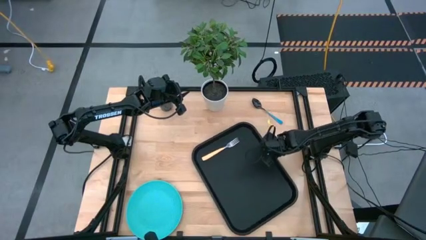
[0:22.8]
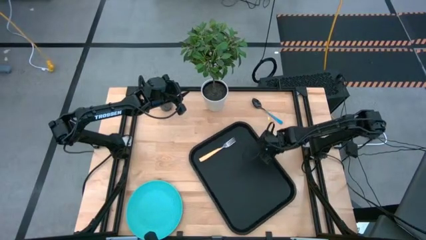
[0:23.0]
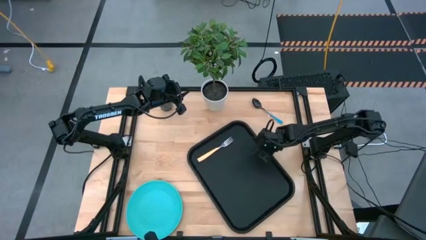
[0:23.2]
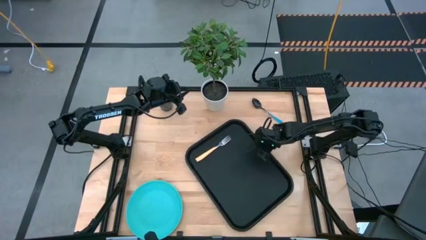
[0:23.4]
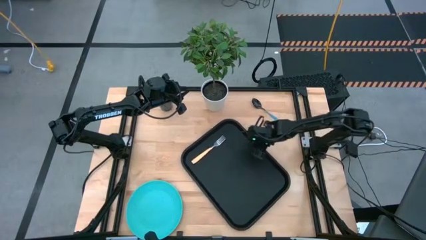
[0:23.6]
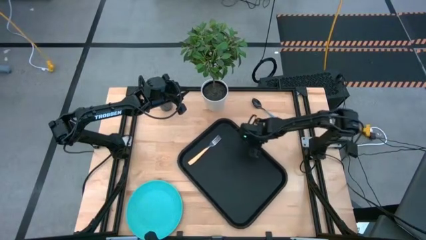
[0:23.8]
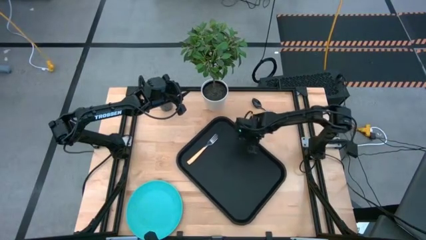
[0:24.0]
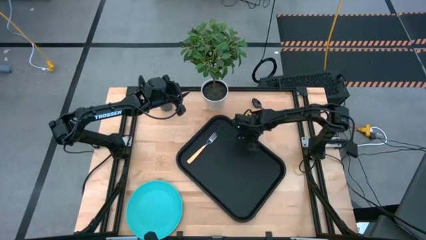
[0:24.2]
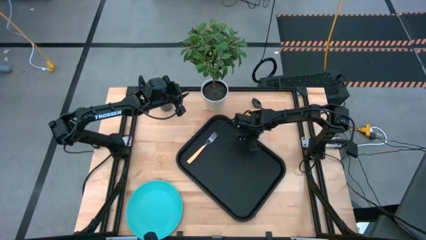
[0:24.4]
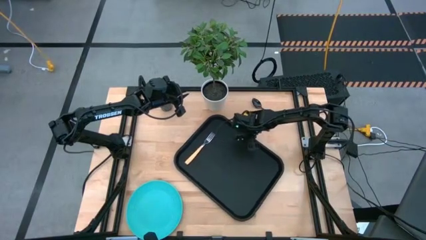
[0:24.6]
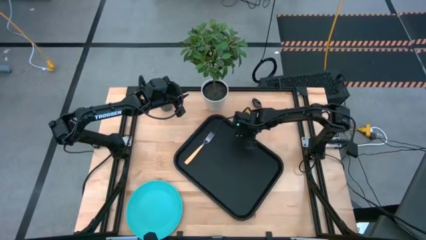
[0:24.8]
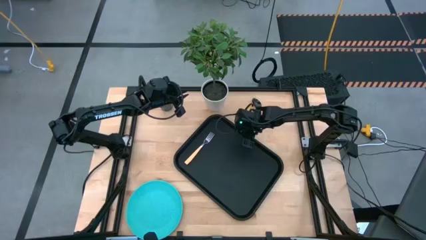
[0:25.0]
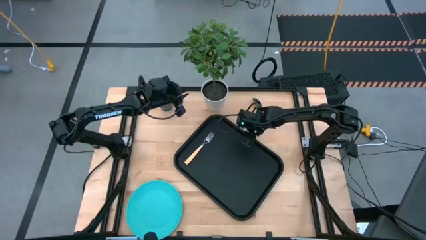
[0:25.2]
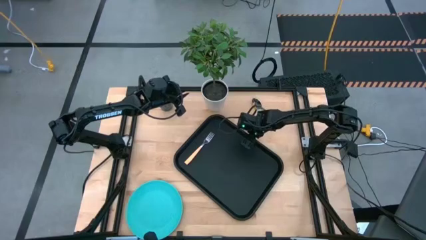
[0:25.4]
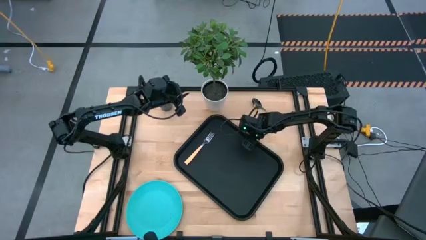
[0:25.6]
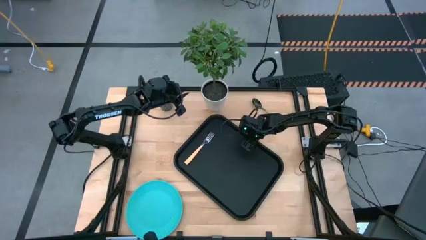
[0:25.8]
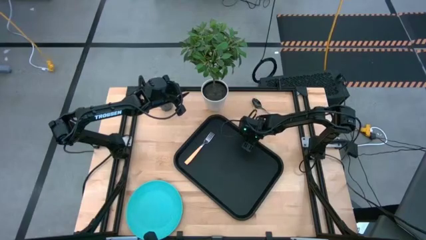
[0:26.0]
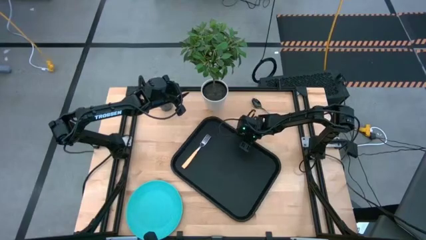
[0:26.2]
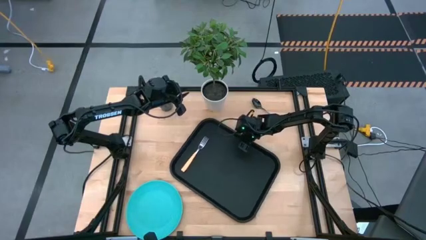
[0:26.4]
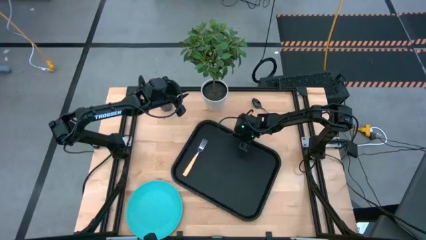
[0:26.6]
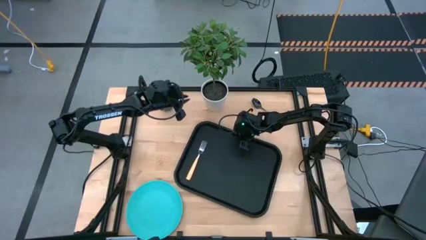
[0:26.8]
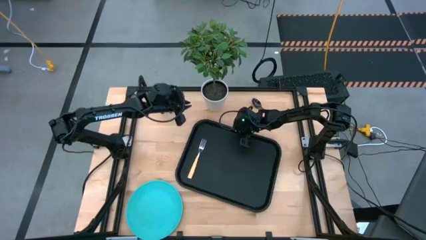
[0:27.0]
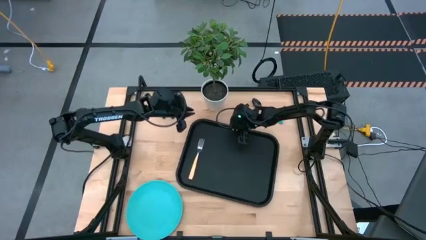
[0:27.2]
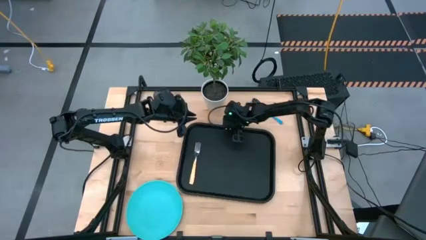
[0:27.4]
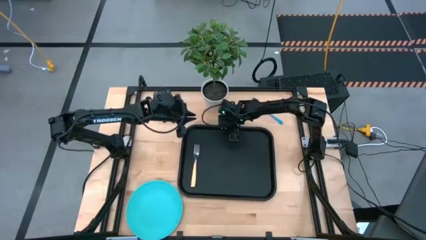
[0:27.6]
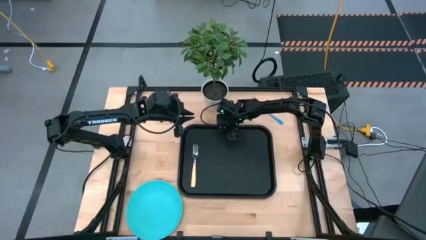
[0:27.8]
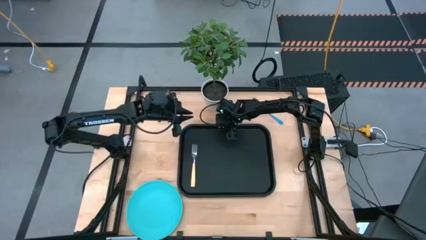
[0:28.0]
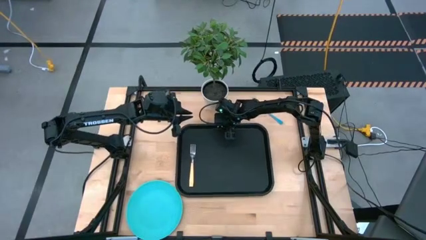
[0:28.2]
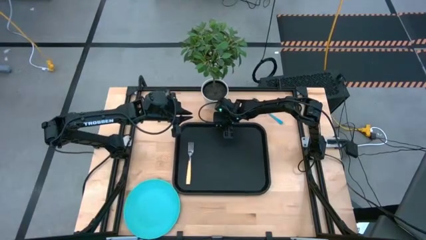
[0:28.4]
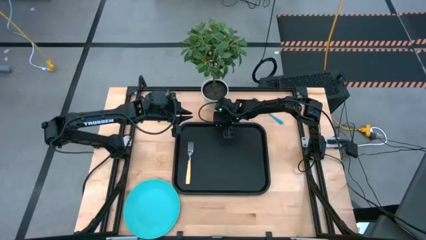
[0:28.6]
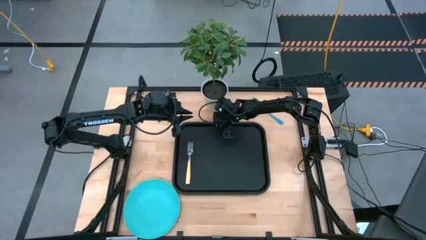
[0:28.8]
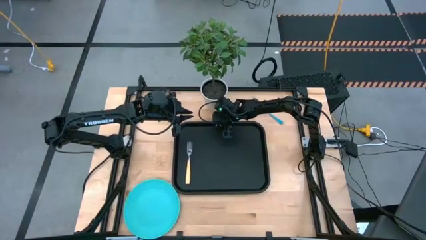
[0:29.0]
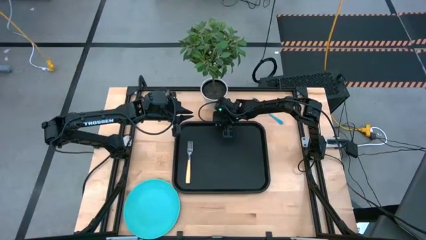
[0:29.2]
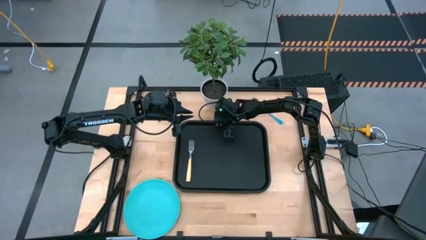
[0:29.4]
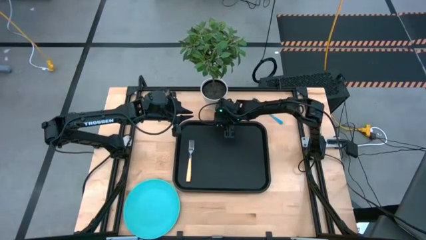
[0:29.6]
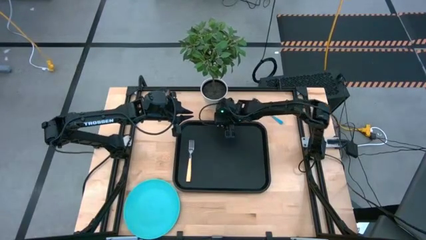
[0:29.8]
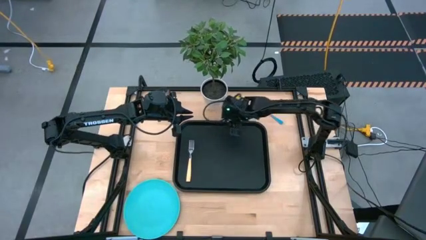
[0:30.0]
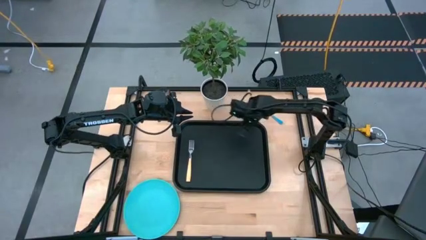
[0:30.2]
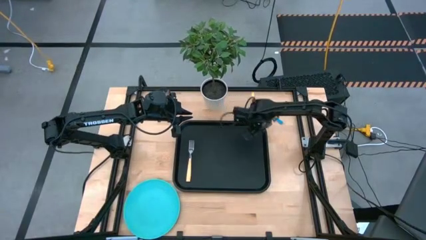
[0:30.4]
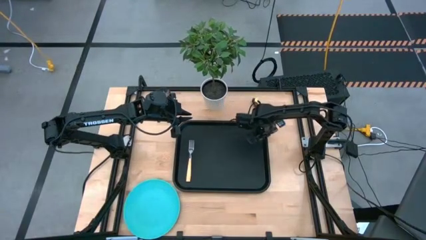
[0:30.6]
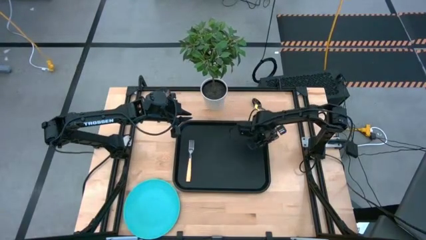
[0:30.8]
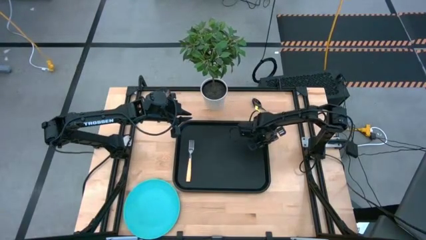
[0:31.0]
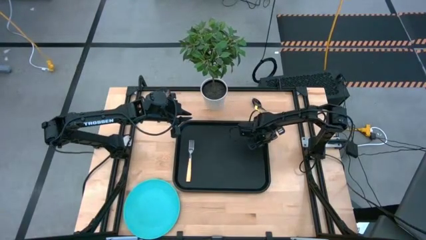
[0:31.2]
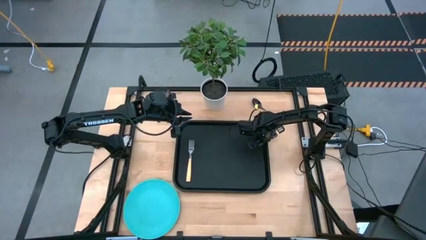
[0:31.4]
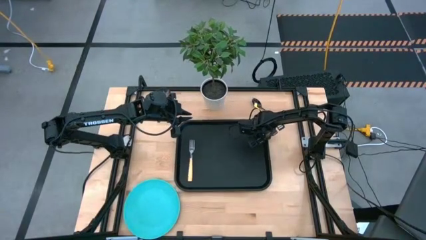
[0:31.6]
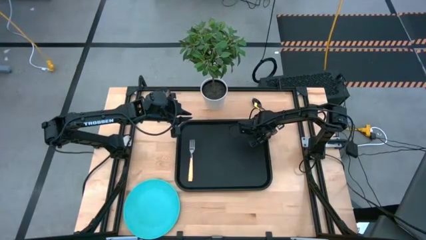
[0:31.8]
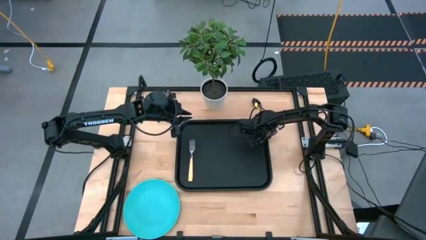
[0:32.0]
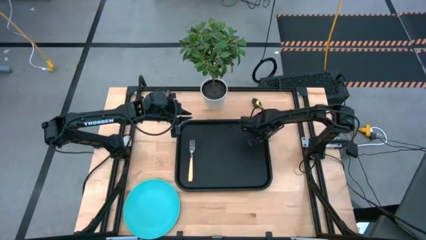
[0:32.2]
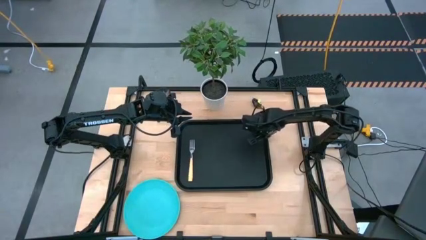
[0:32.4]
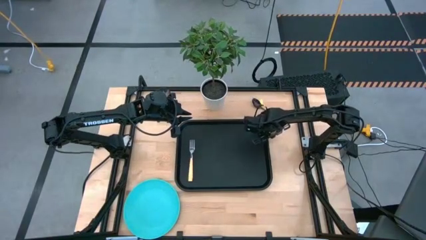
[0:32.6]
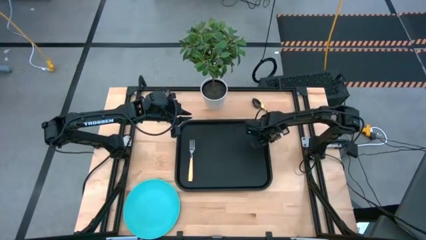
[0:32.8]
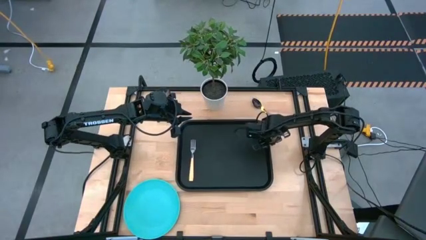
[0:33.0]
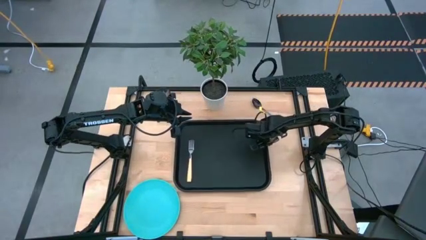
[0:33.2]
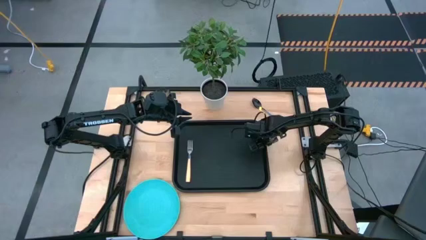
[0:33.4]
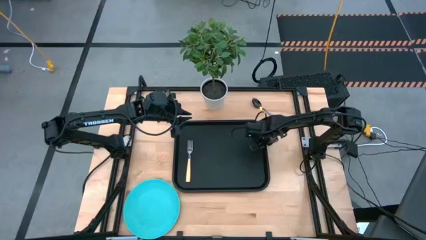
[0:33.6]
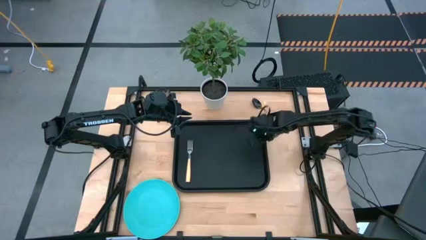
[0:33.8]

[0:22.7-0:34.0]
Task: Pick and place plate/cup/fork/spoon on tray
Move the black tray to the center of the table

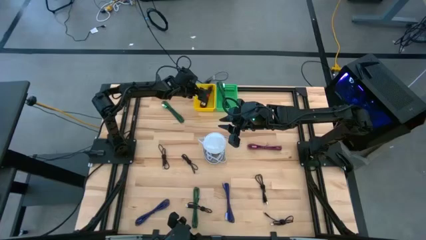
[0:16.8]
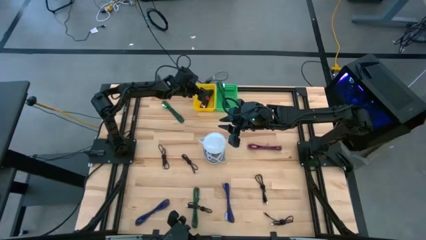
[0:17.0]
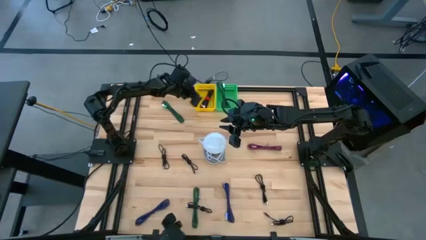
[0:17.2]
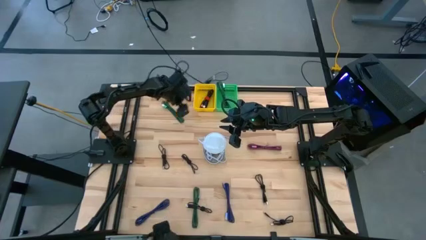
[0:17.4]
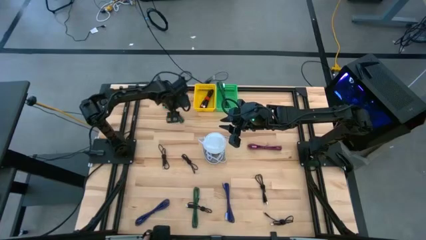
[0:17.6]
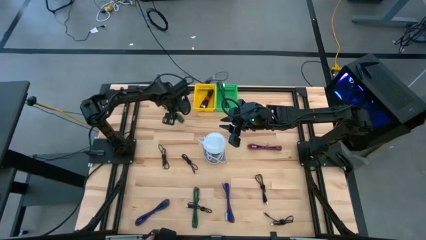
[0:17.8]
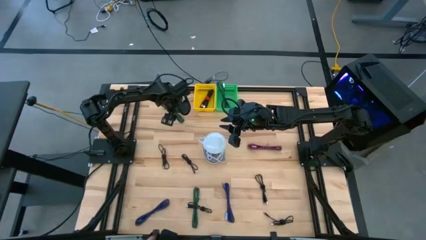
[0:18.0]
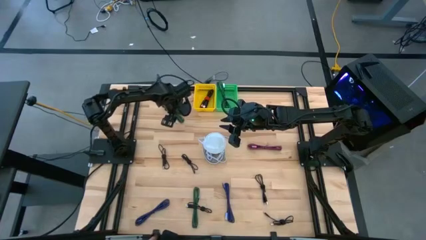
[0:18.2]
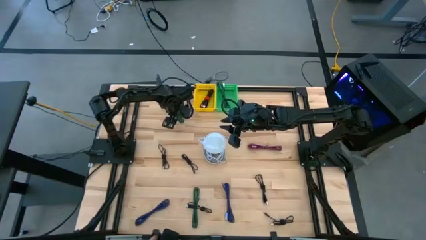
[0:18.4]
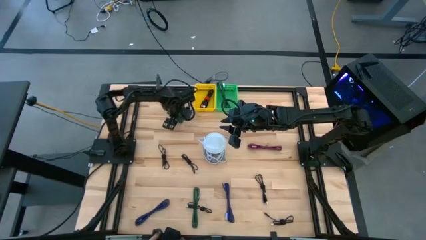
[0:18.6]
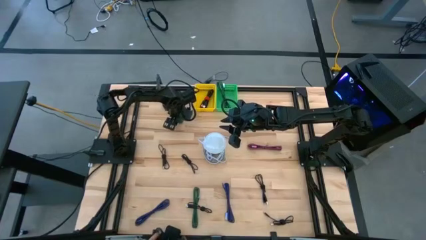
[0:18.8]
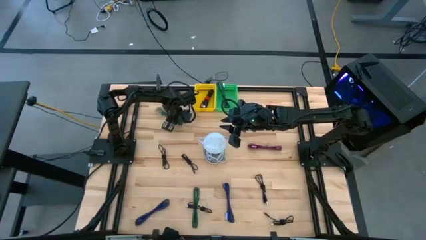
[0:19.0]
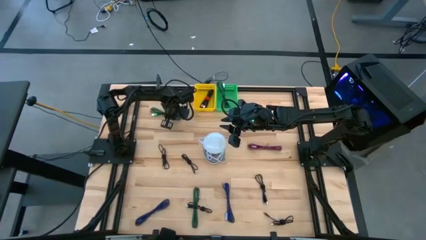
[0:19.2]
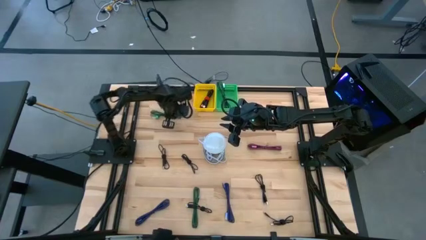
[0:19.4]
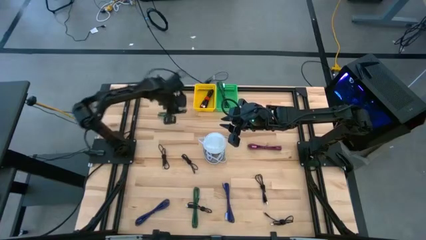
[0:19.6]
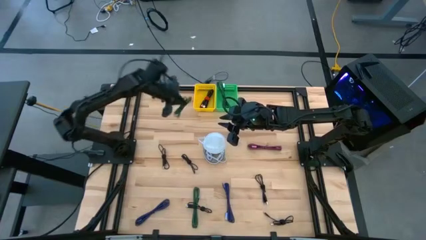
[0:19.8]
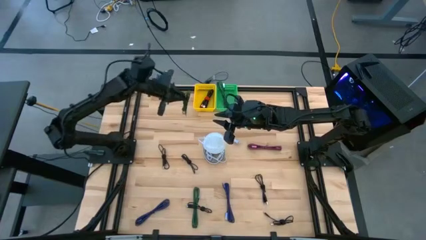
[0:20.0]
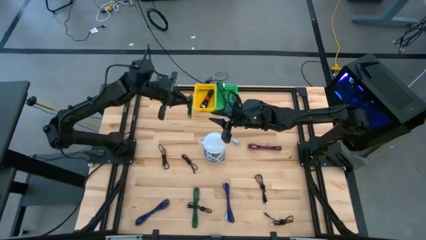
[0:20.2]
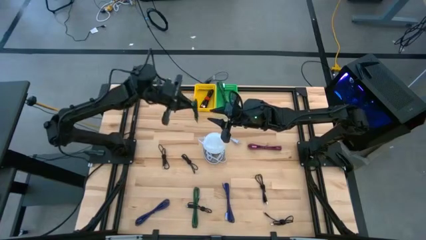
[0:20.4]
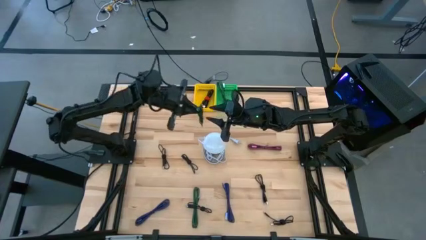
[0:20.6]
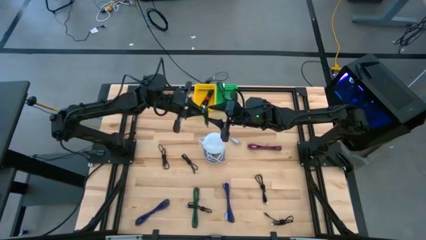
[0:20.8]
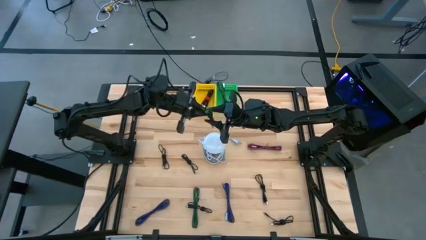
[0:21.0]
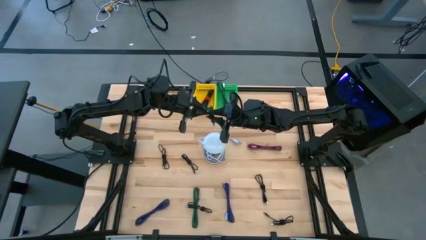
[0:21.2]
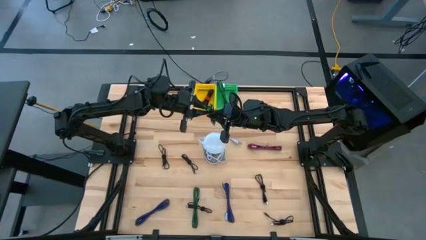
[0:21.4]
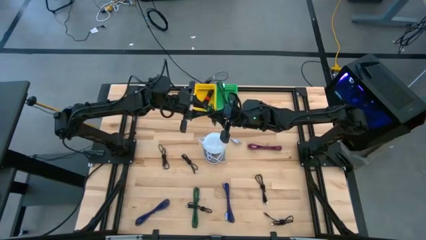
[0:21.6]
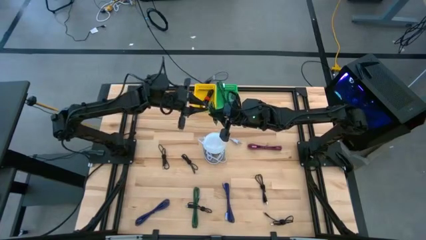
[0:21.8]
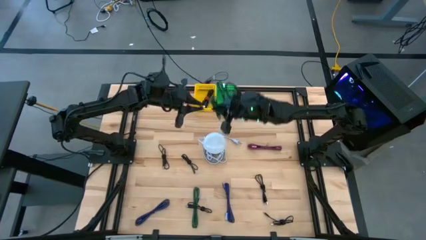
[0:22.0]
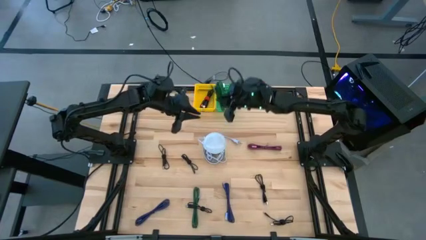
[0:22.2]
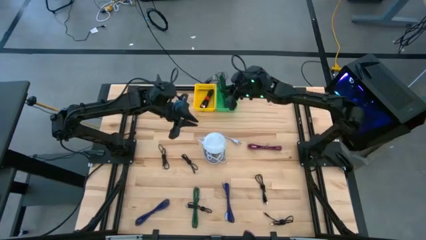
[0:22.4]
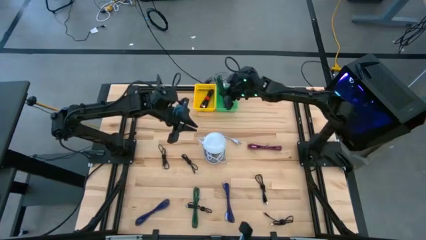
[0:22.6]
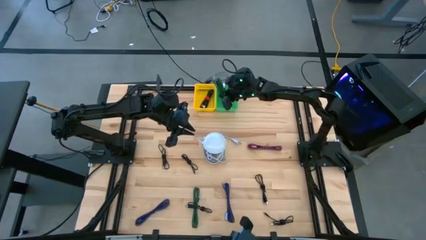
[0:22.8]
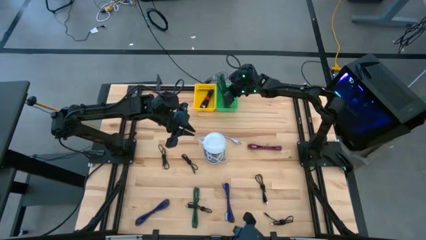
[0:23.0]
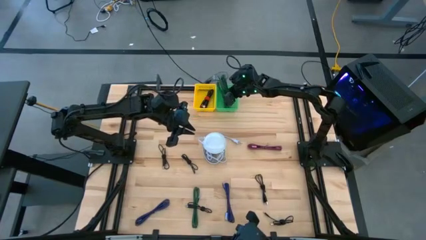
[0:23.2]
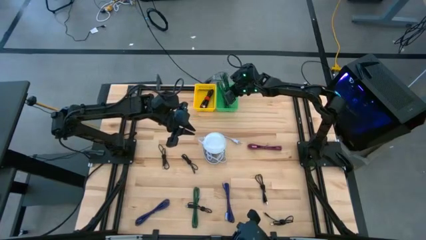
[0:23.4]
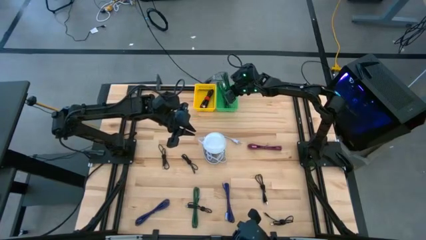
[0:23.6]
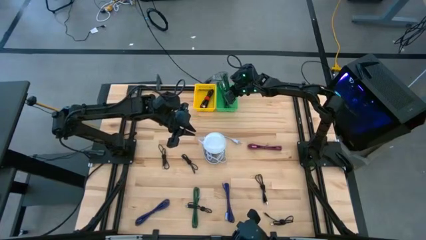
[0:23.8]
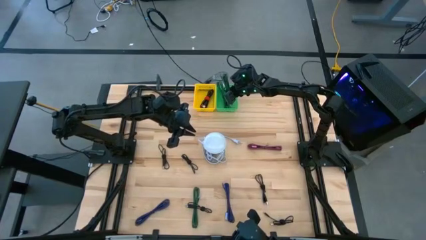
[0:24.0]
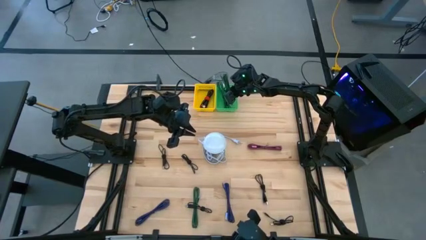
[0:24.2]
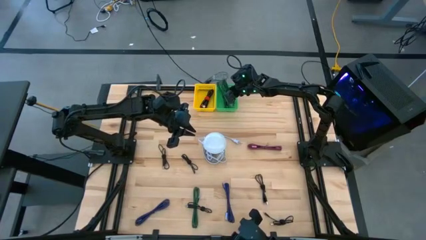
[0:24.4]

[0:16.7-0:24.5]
Task: Pick & Place USB Port
Put the green charger cable into the green bin
